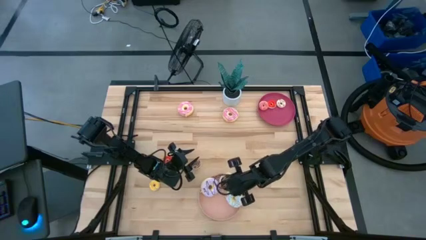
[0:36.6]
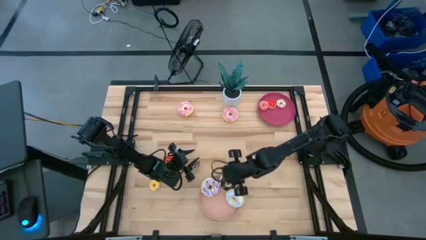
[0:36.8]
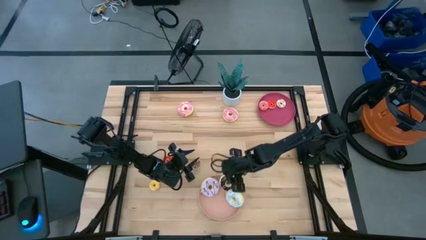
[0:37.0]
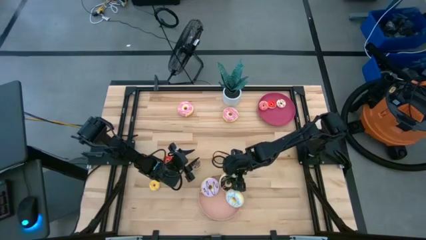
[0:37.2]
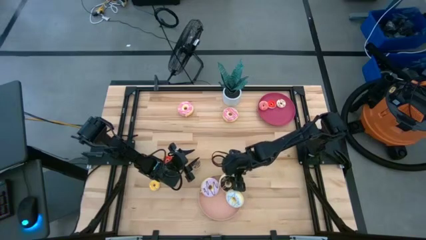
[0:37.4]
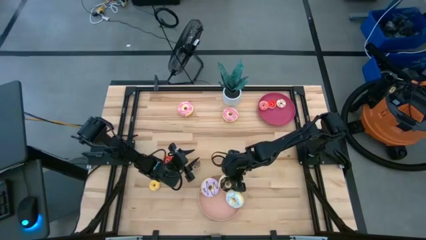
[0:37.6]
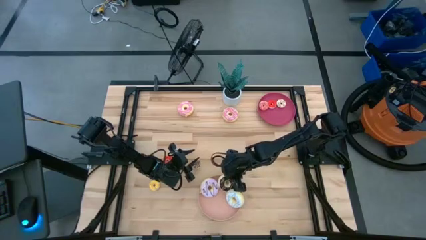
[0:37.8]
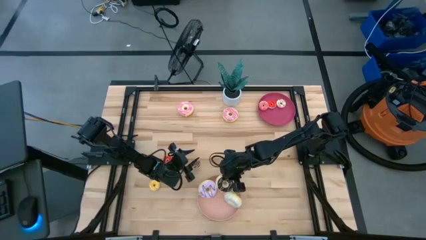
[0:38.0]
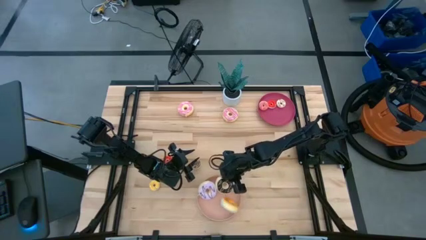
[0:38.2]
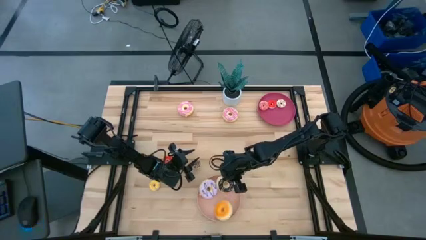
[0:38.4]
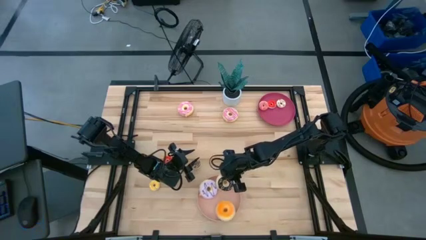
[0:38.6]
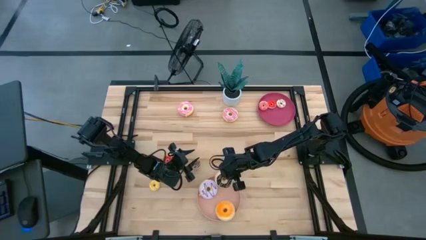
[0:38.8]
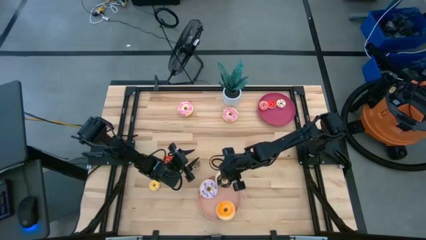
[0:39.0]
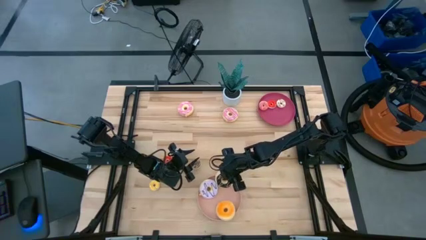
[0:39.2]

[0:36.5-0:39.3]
Task: Pick & Place donuts
Adjust the large black donut on the pink plate

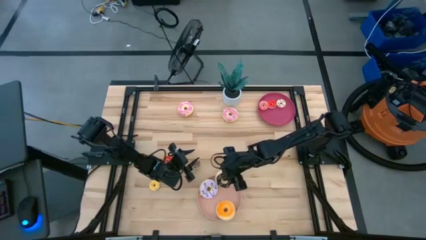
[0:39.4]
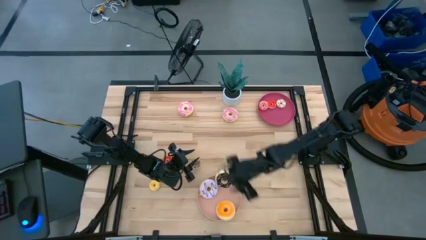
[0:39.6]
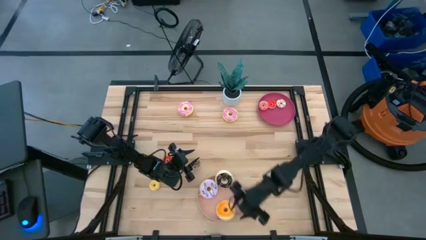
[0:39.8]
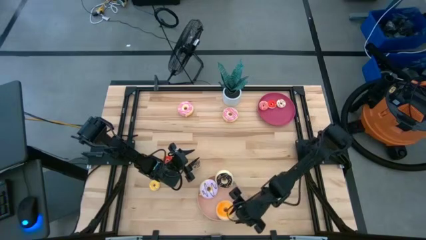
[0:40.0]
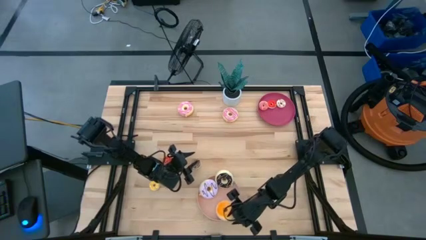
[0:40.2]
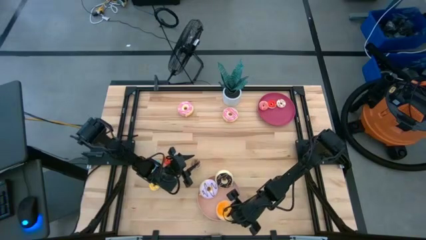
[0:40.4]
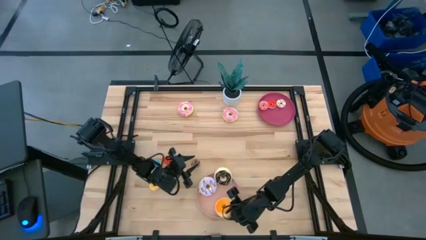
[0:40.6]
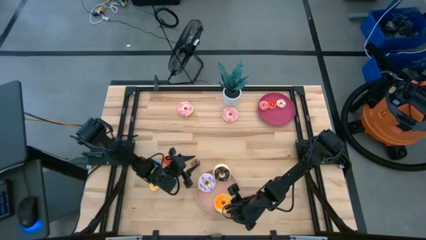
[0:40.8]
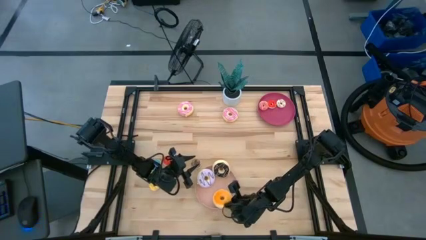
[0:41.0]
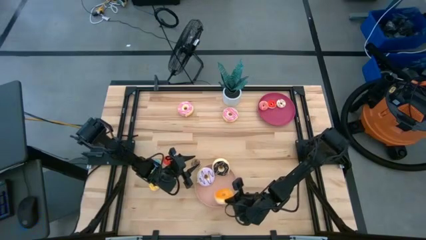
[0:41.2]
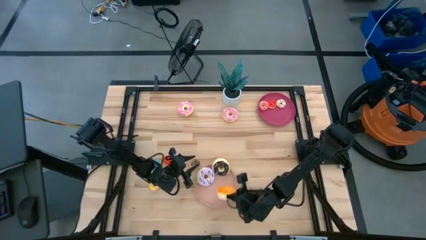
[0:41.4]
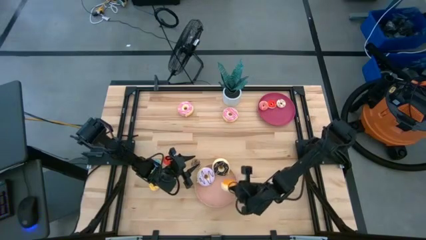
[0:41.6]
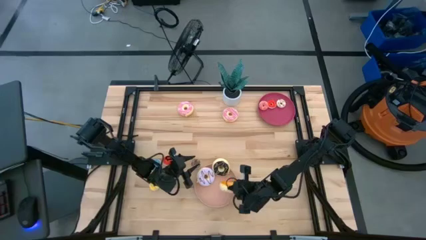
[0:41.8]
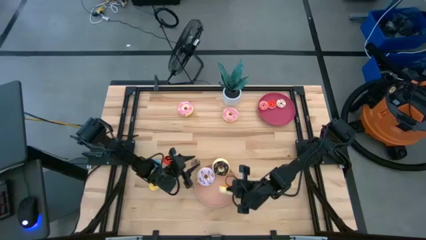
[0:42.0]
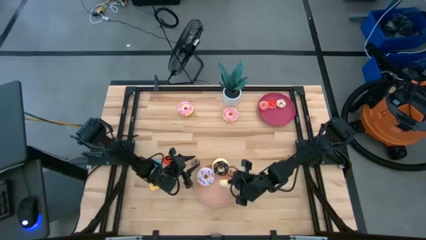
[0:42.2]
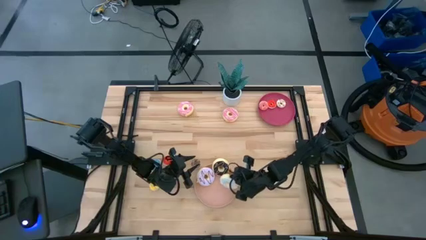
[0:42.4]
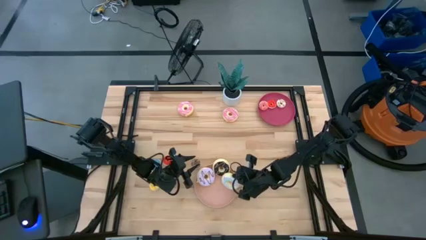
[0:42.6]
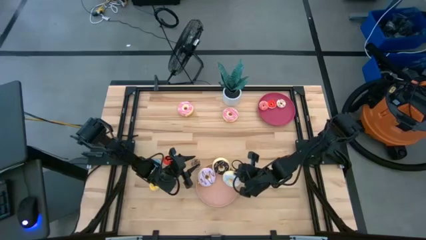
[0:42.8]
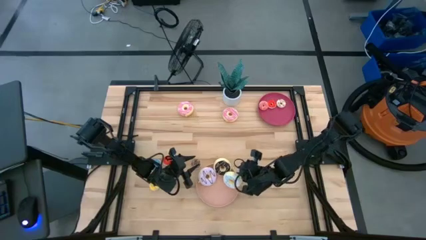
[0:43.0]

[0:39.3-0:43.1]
Adjust the large white donut on the pink plate

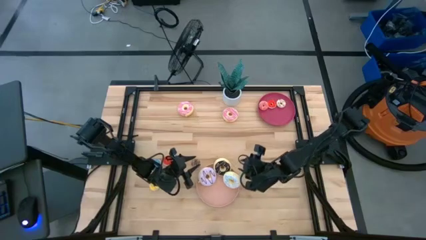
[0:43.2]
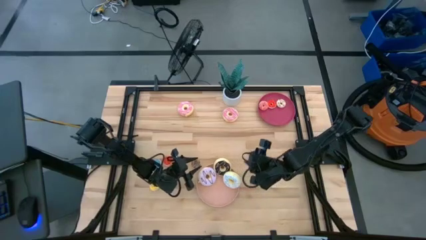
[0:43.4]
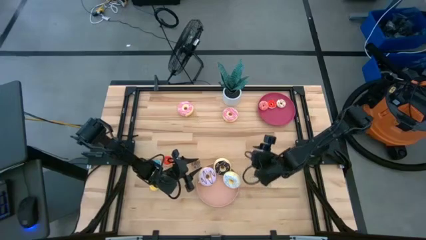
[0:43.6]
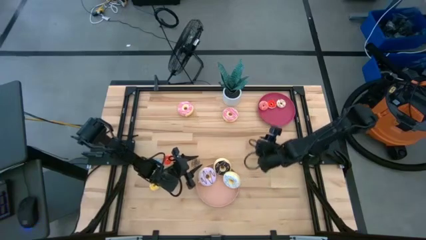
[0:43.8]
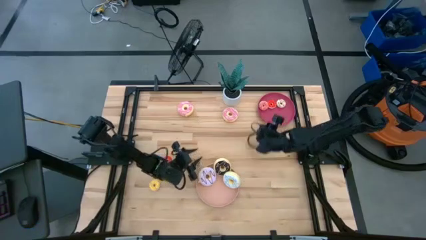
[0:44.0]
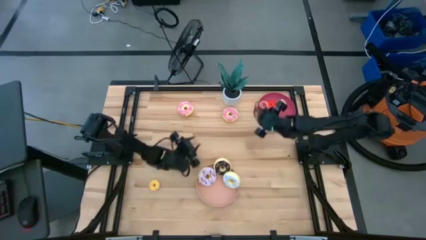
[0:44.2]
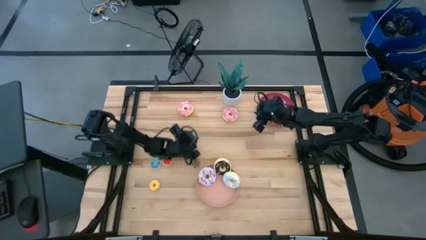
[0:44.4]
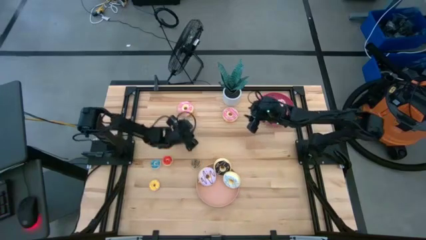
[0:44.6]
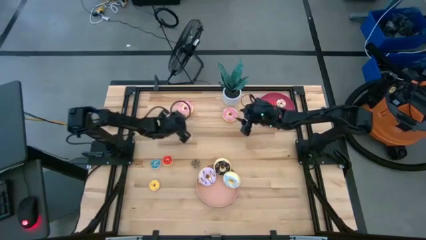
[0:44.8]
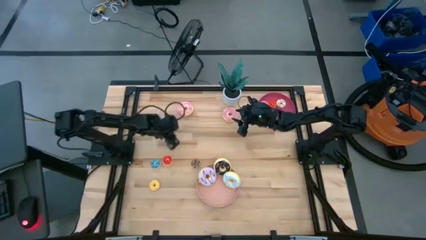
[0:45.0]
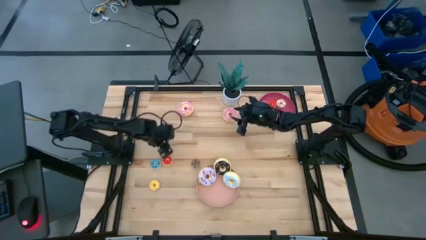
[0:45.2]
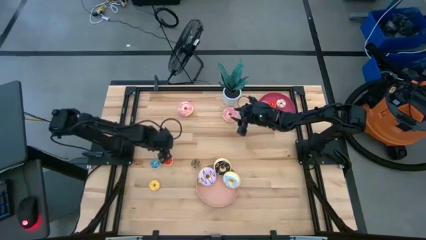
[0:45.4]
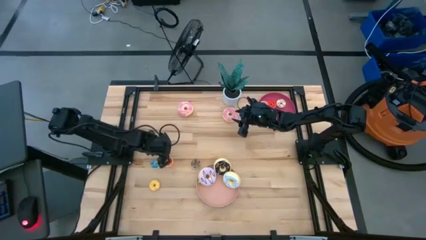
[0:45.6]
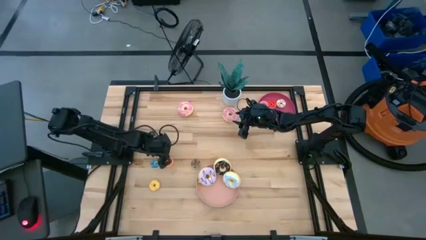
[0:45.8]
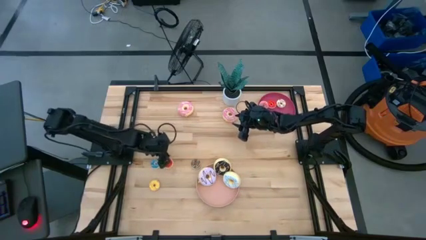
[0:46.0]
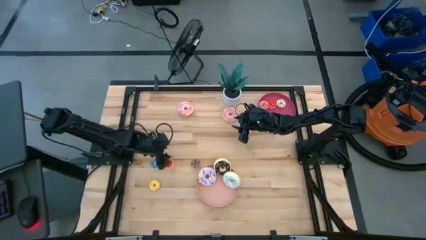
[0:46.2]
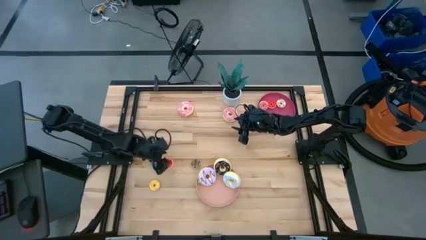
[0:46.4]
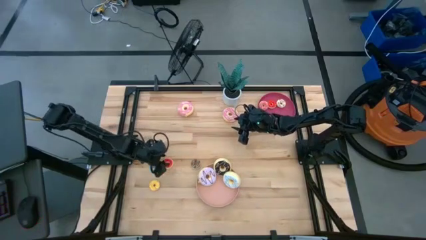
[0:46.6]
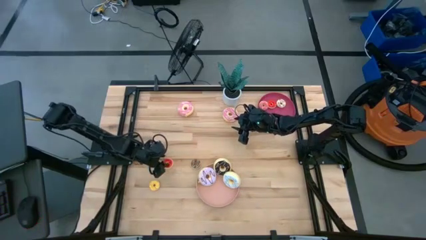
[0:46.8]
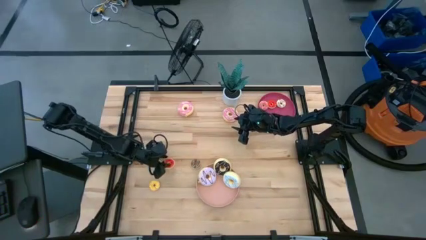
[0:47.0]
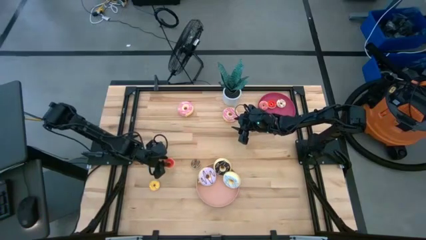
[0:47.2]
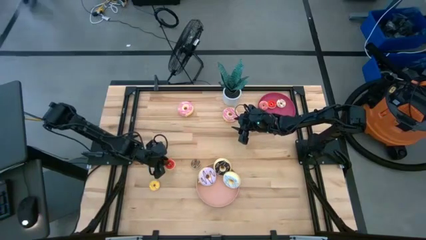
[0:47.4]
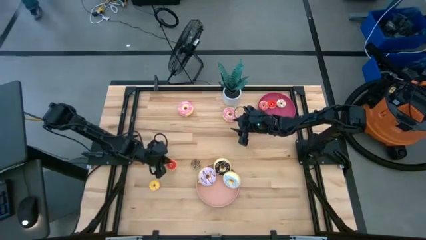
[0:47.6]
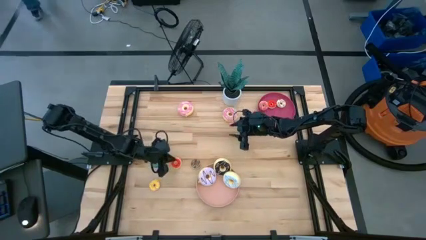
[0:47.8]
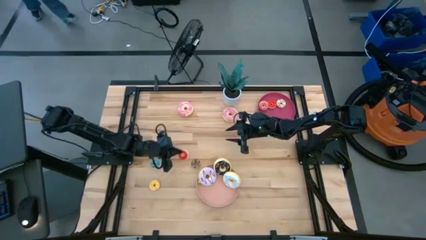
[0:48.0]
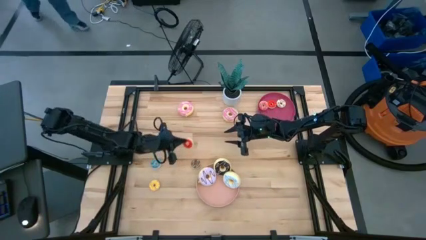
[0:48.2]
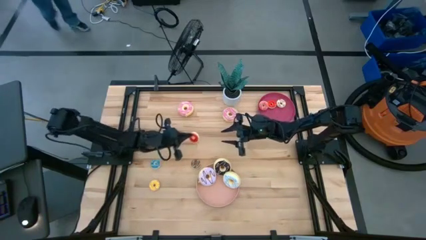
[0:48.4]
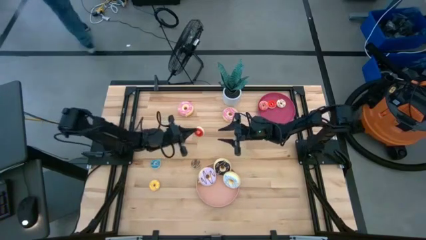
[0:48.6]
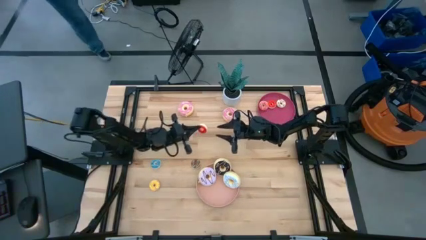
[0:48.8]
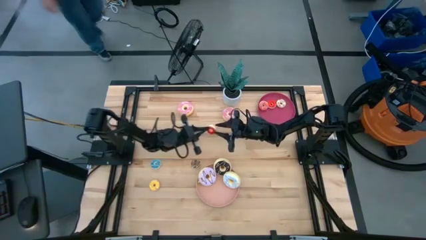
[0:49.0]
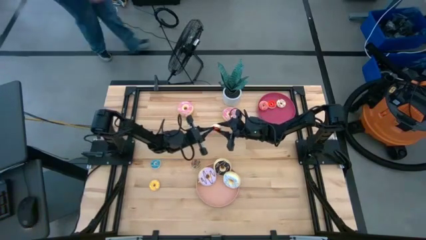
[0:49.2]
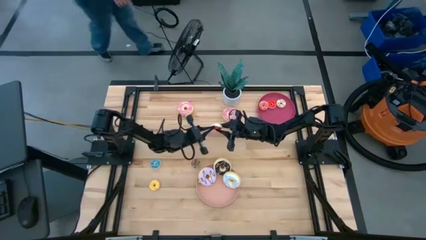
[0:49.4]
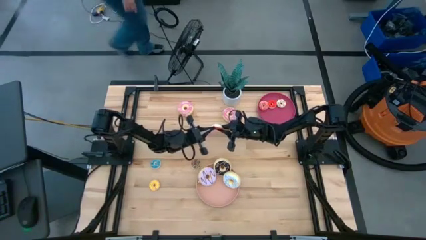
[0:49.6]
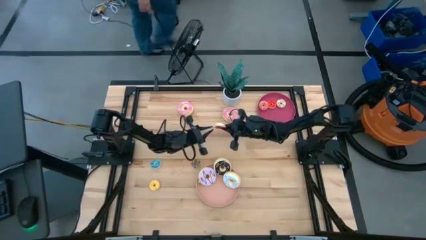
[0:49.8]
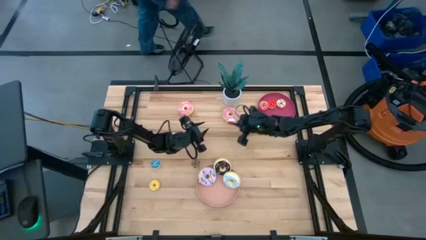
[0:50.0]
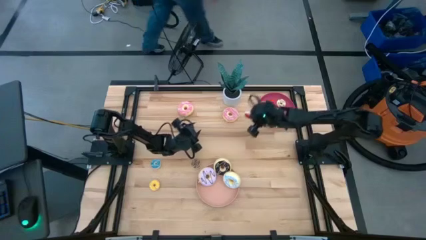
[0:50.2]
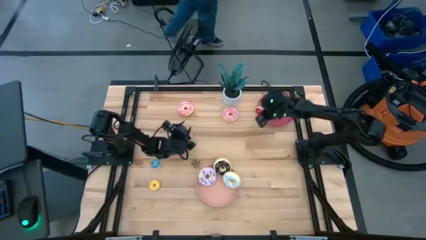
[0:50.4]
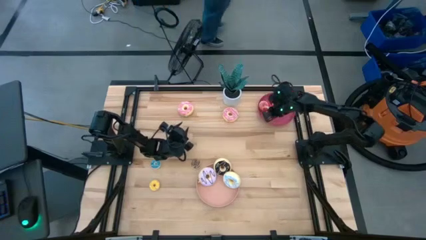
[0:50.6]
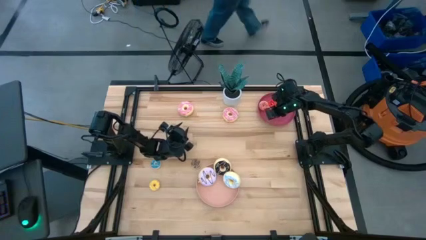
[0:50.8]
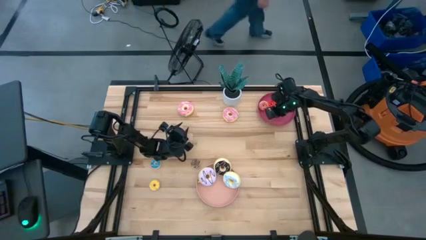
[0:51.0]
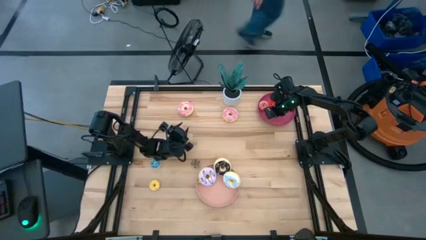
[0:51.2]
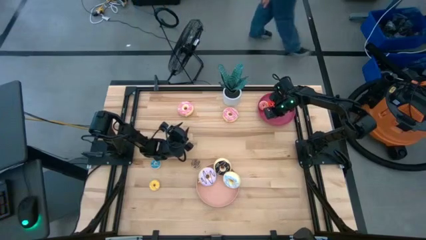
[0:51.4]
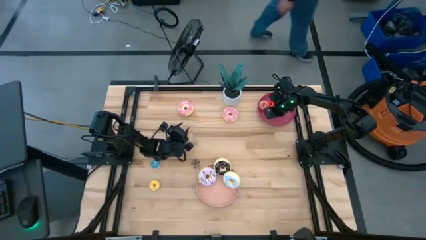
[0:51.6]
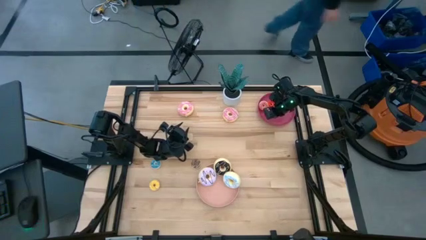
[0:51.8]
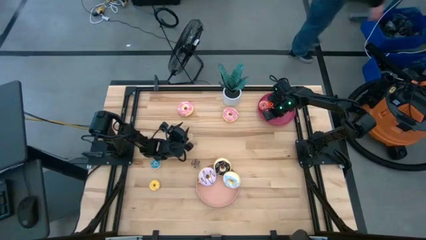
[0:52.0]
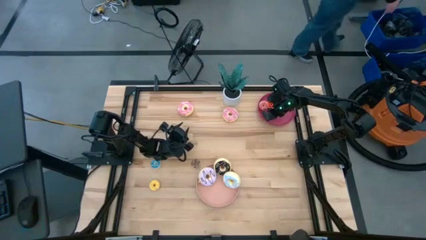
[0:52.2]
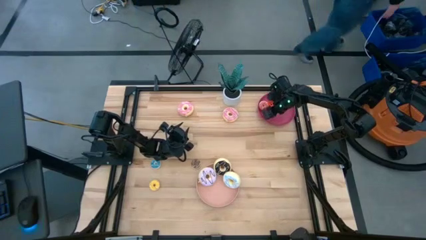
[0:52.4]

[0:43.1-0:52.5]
Put the small red donut on the red plate

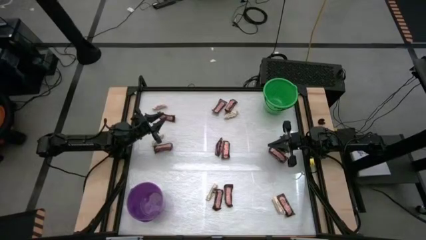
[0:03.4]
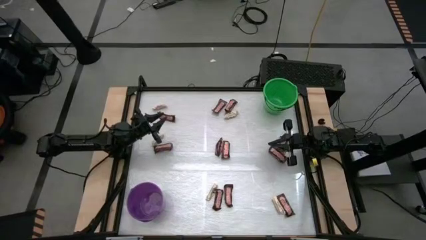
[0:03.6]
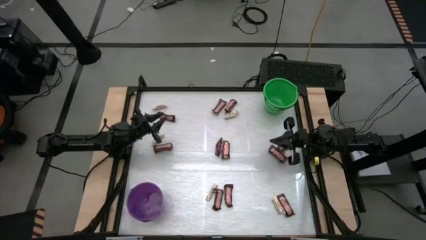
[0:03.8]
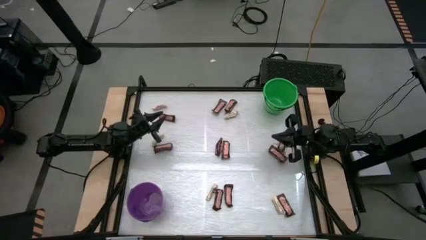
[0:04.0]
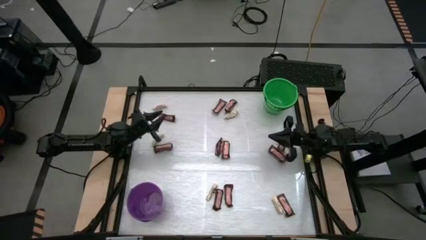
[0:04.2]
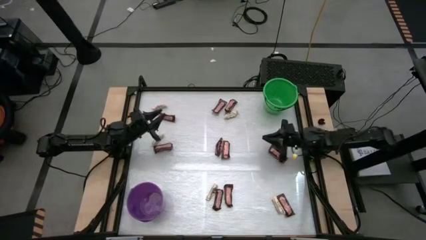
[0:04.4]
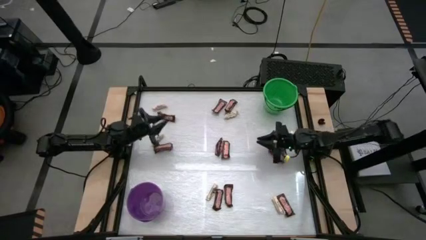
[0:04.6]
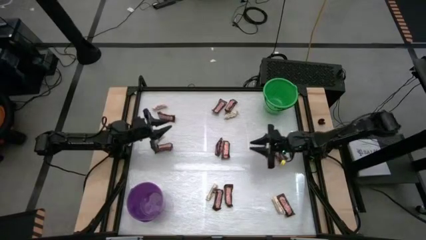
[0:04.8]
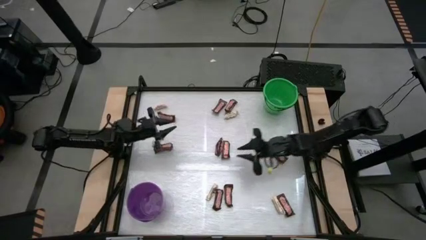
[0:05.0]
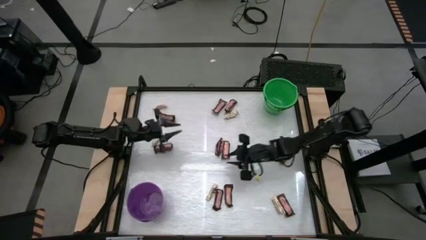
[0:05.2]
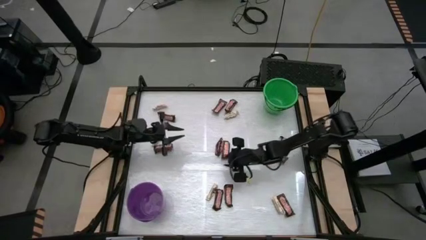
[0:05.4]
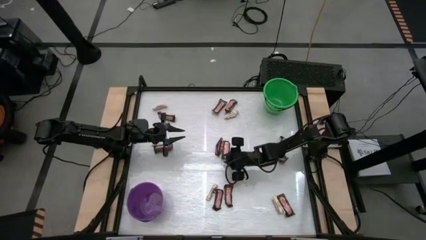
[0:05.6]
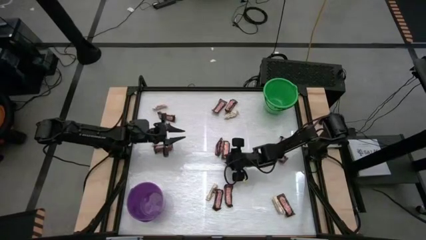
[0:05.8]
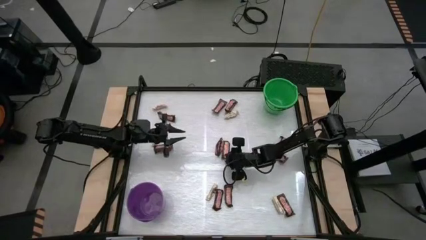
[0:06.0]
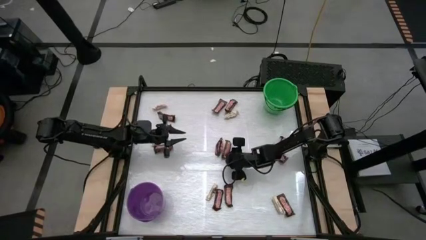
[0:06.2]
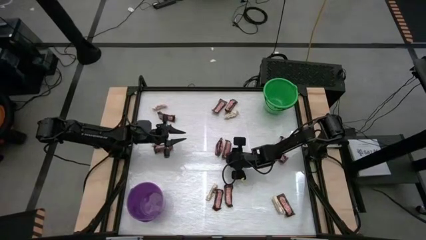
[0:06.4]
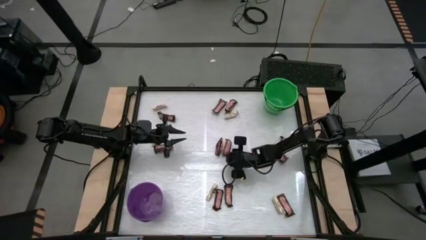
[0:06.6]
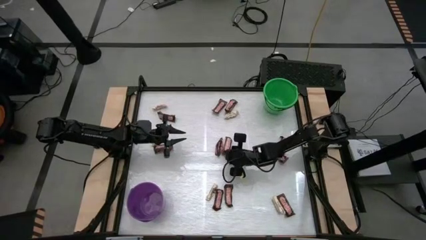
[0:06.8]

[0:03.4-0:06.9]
Task: Sort candy by brand, put in halloween buckets
Put the brown candy bar into the green bucket
